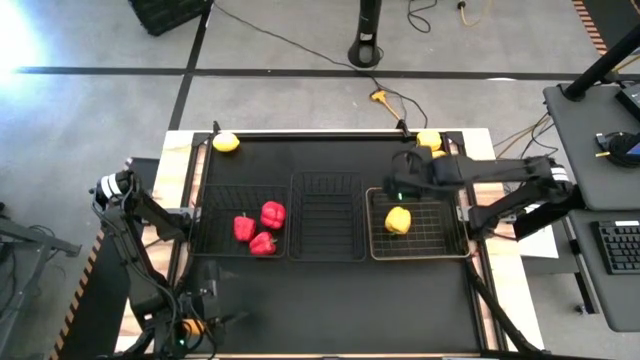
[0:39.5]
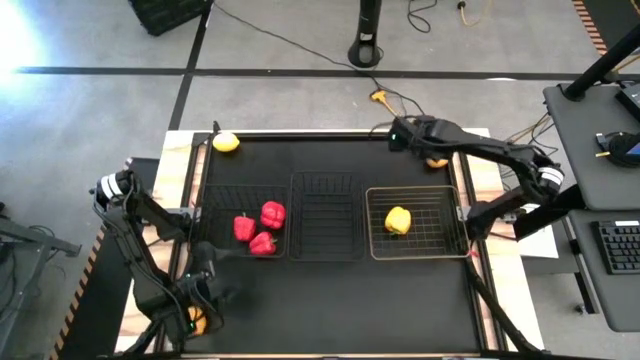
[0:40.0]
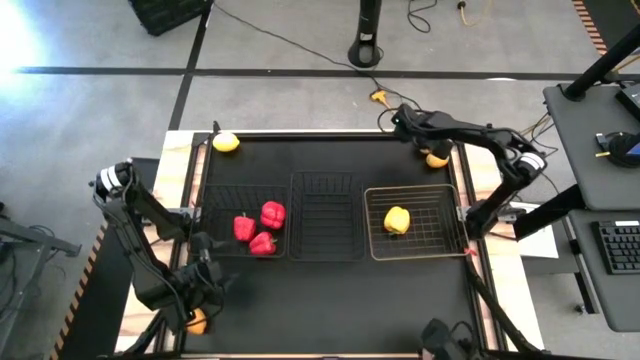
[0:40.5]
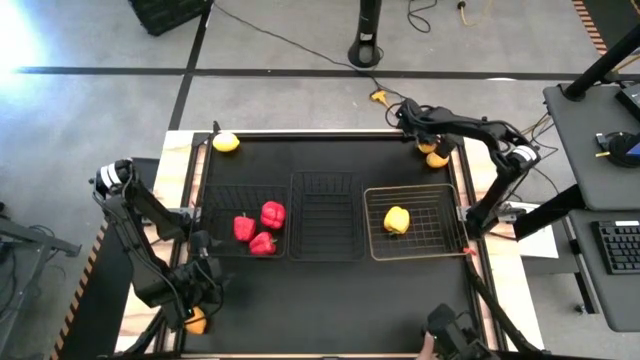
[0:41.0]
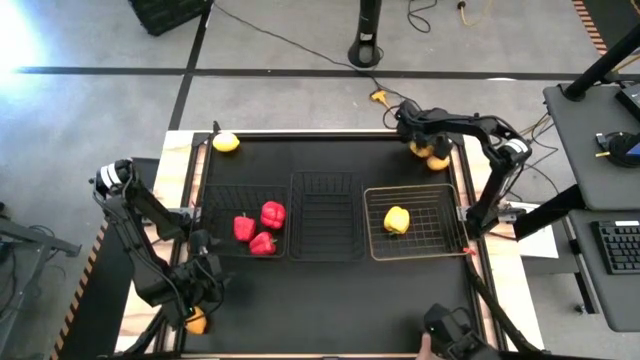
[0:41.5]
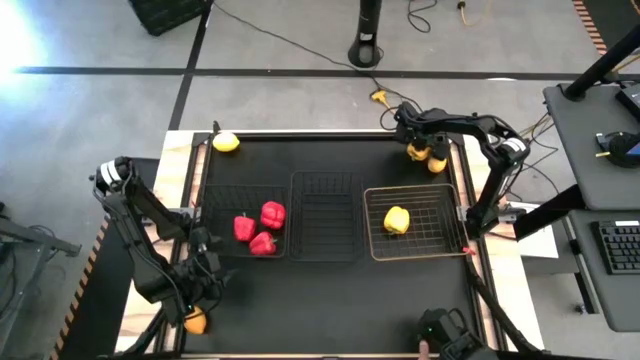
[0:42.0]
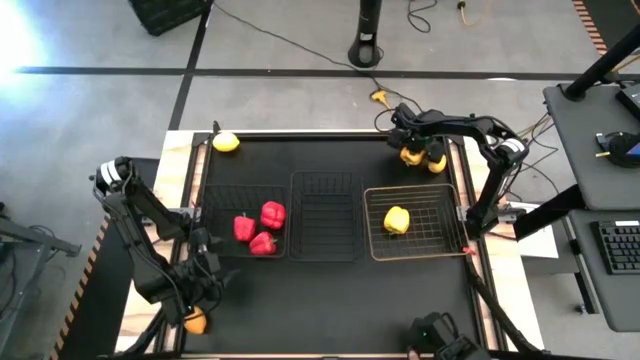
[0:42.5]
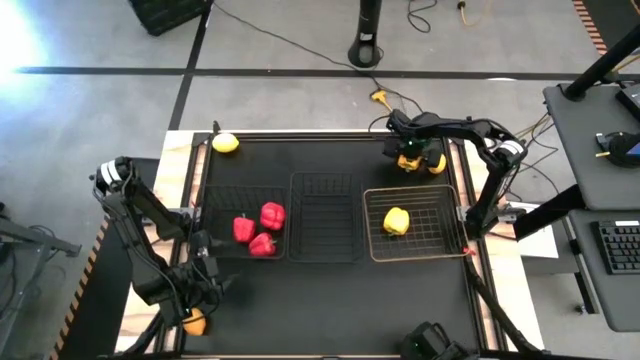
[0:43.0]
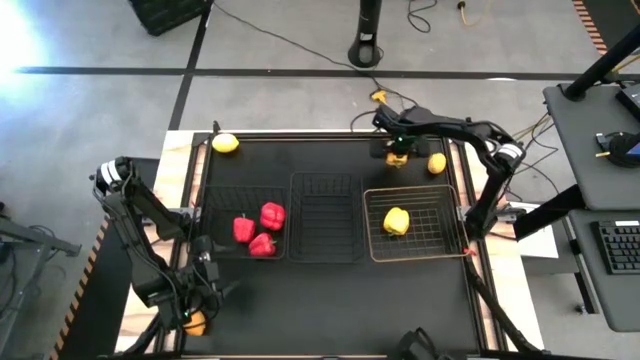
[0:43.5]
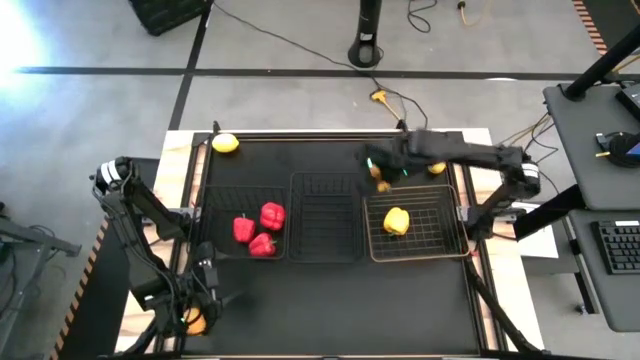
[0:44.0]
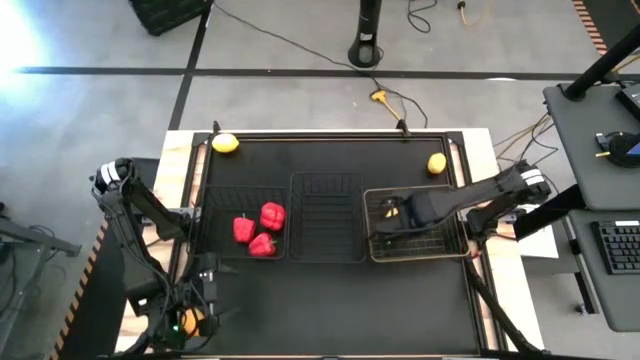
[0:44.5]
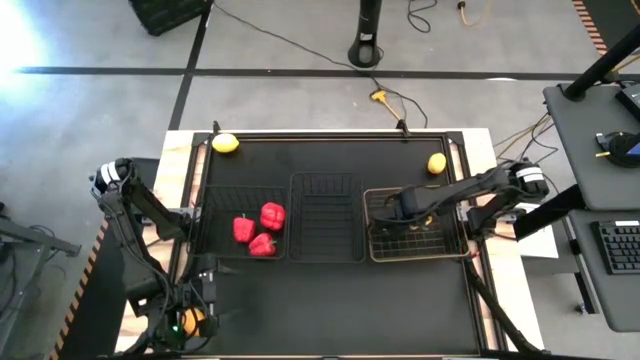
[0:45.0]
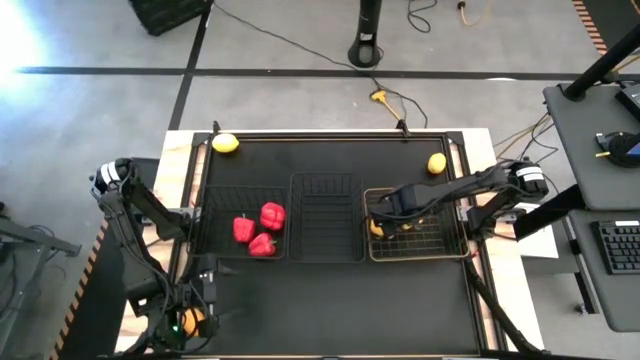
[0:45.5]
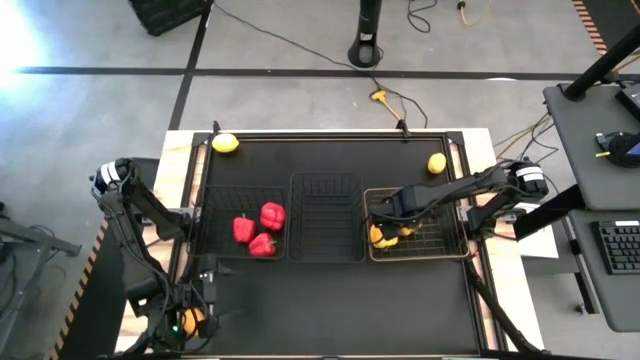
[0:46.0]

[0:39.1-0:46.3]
Task: Sort produce into baskets
Put the yellow bell pepper into the gold wire basket

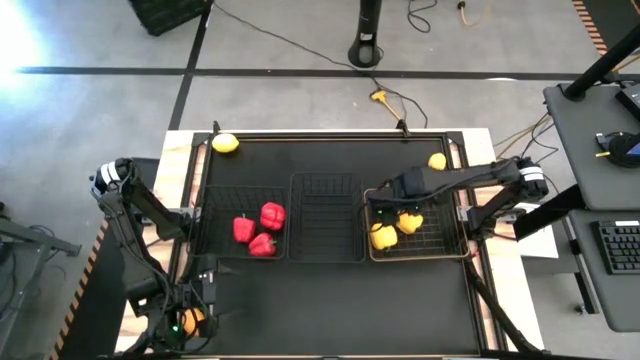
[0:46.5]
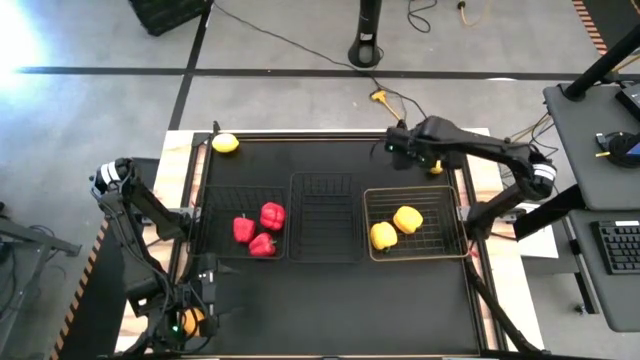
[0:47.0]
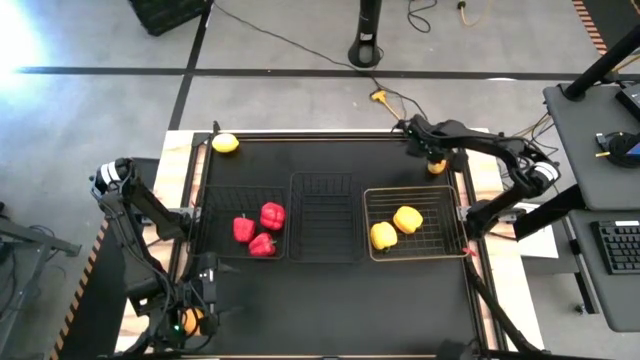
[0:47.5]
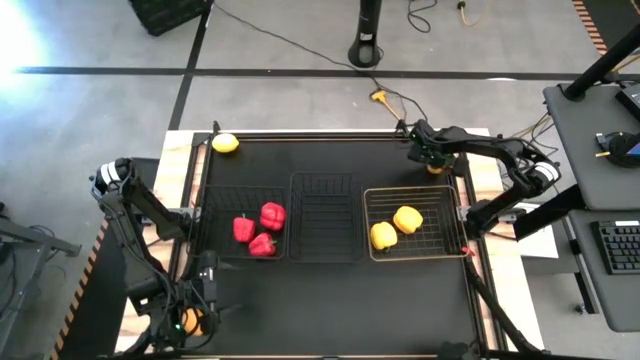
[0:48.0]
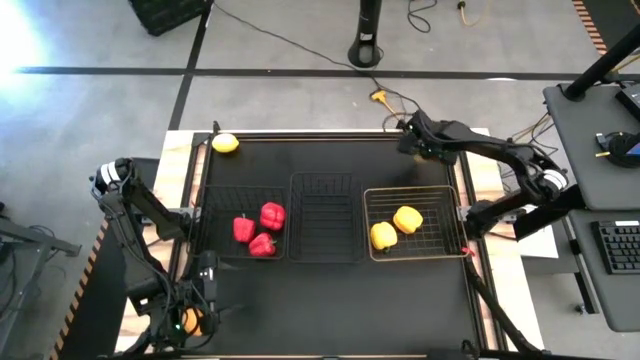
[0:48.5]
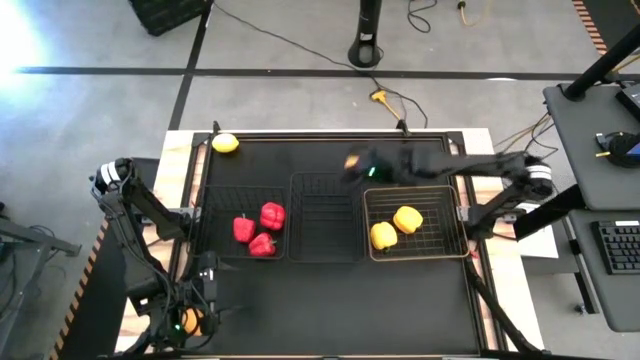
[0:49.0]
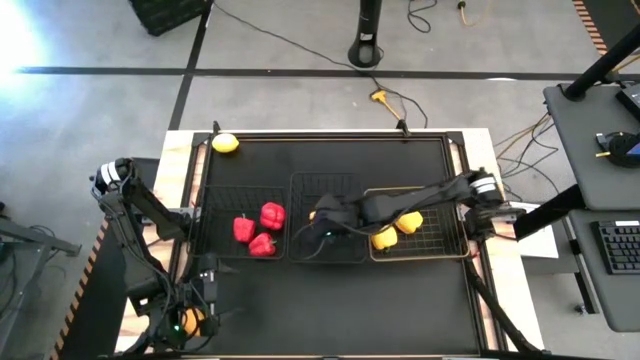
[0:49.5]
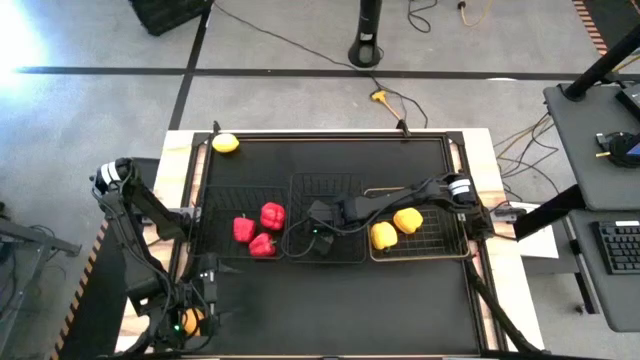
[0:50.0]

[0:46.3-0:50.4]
Put the right lemon into the right black wire basket

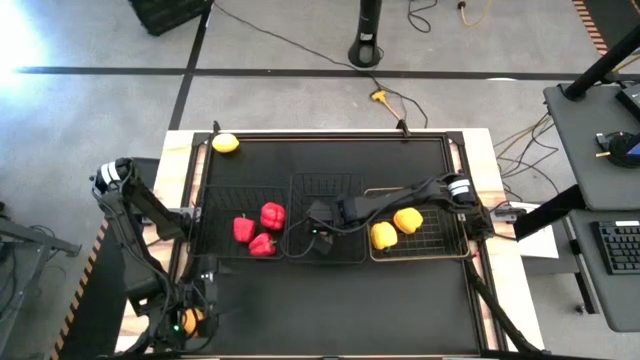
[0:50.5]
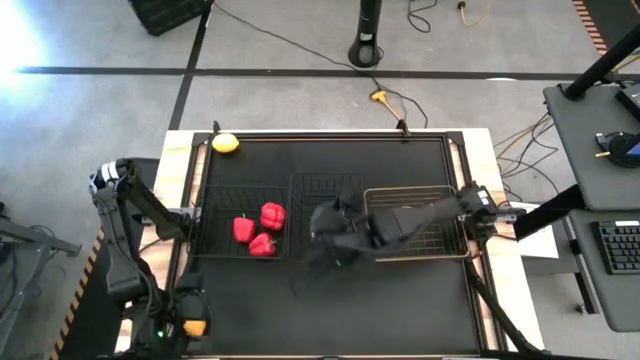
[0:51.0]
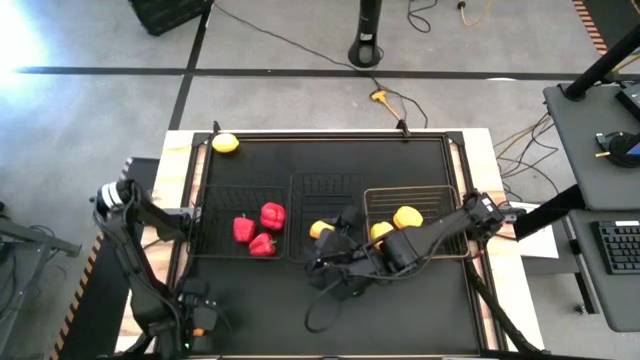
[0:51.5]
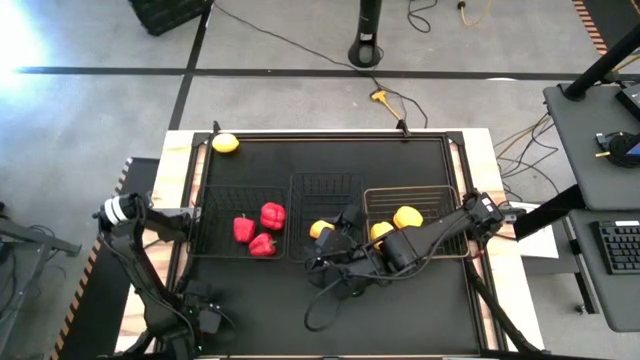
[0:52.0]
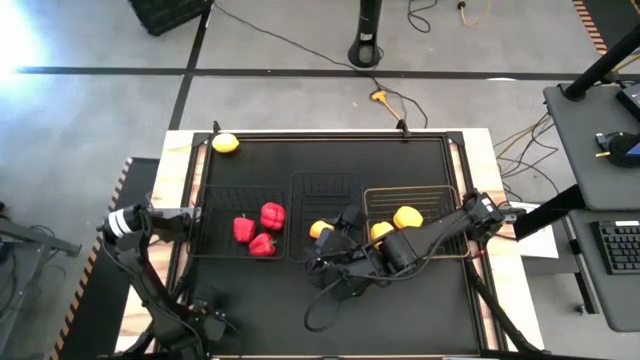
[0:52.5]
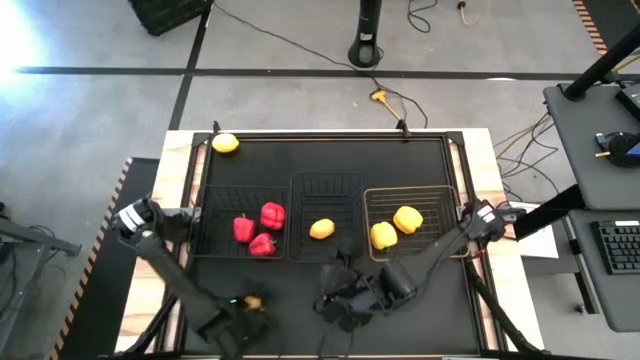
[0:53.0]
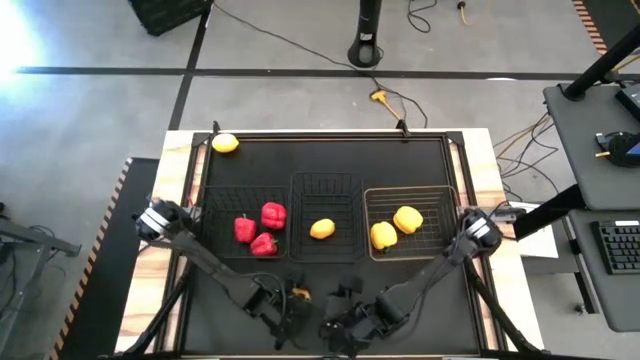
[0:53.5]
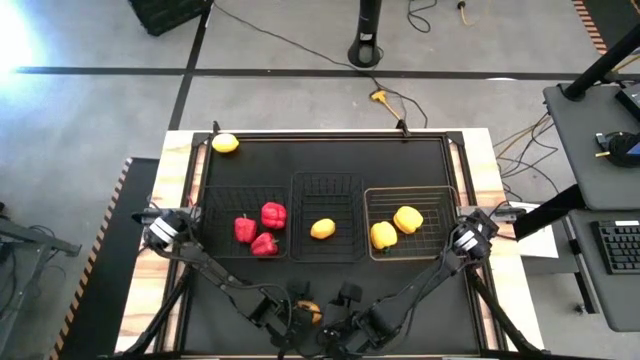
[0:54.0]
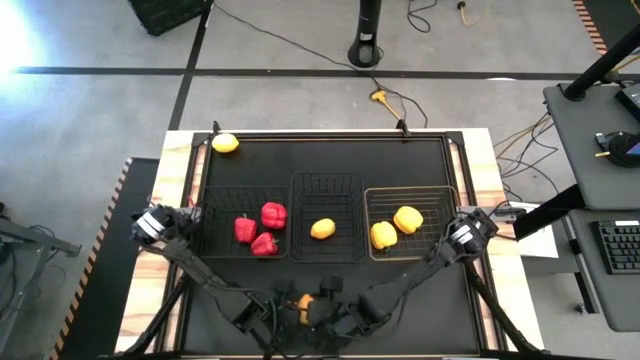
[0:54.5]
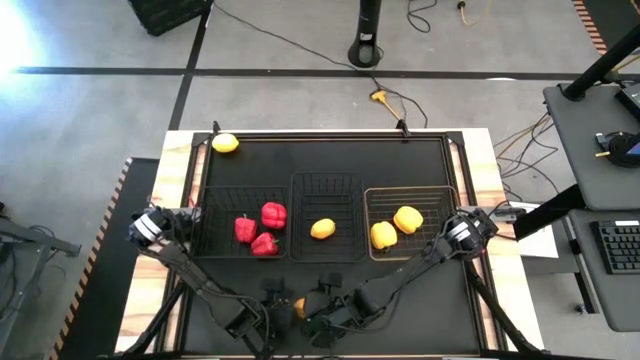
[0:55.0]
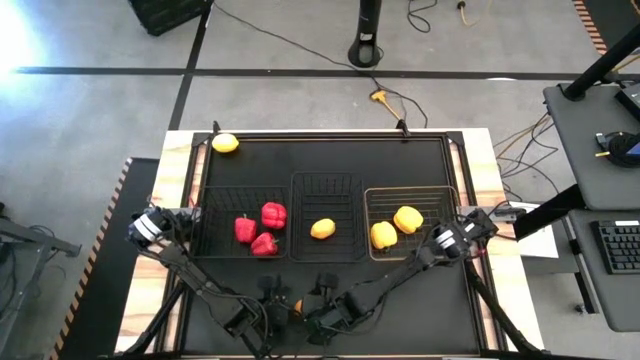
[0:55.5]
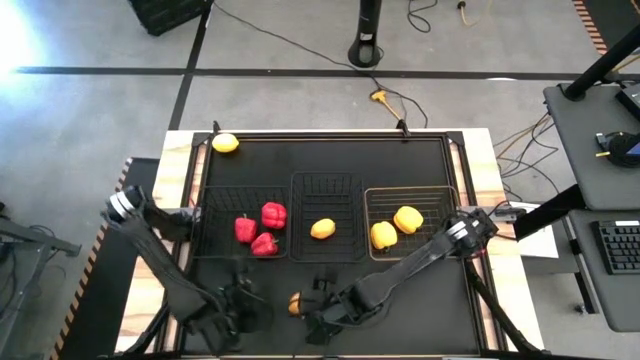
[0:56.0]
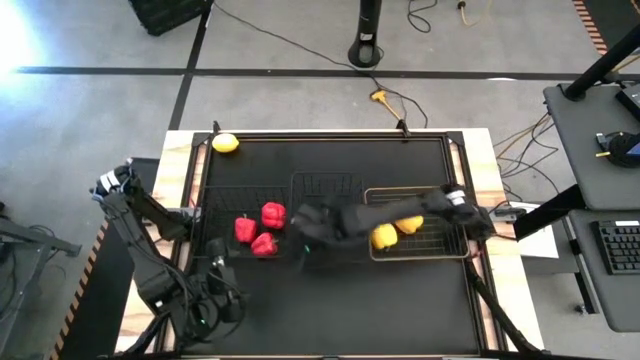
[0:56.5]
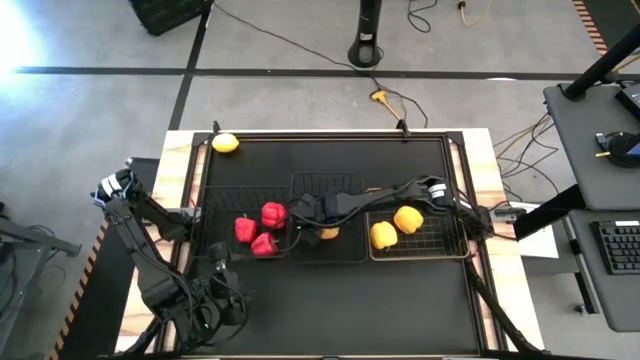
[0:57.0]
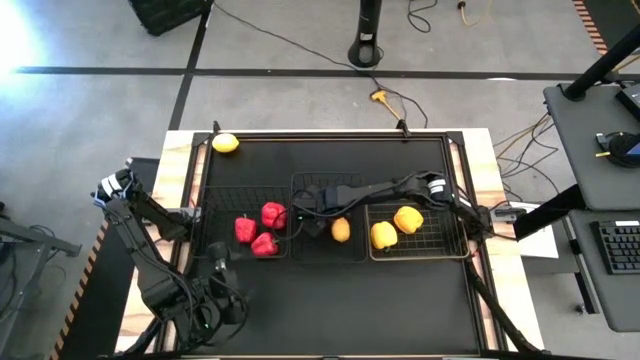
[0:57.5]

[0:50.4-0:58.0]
Put the bottom lemon into the right black wire basket

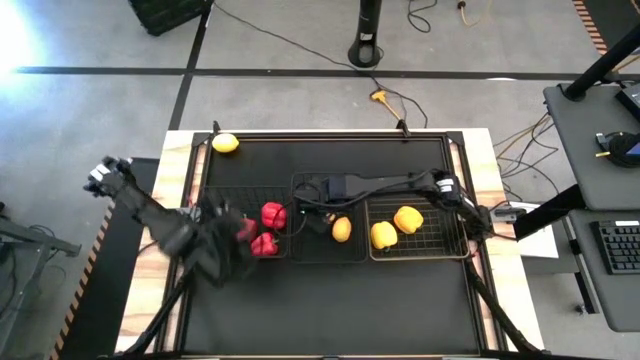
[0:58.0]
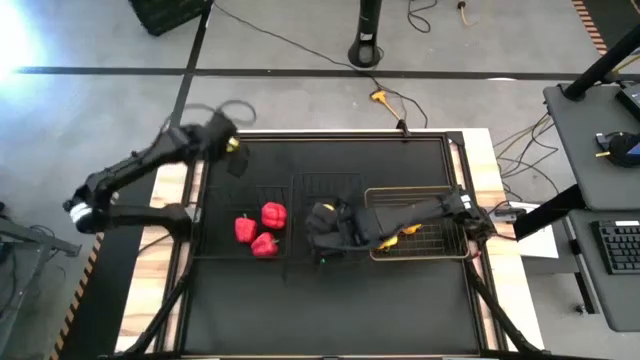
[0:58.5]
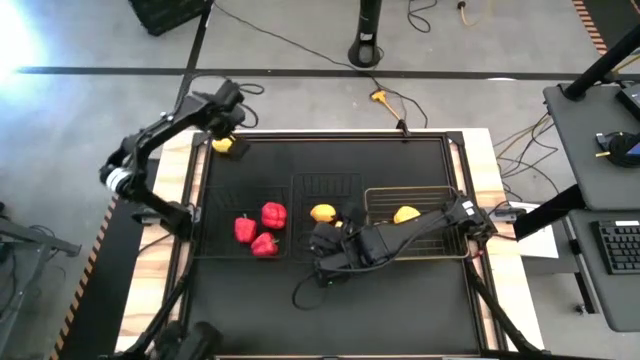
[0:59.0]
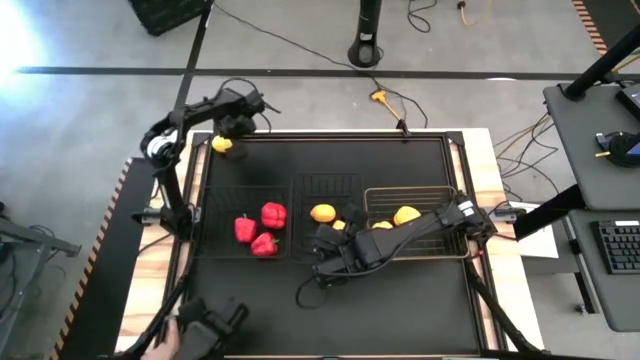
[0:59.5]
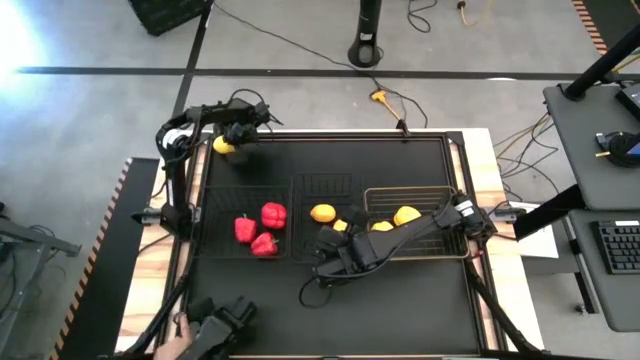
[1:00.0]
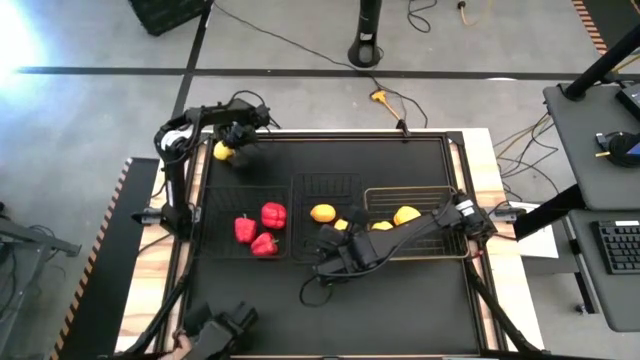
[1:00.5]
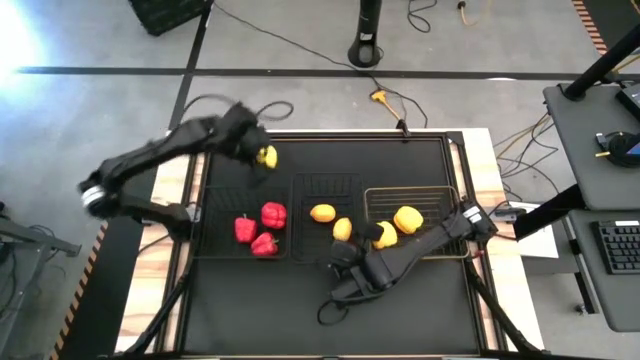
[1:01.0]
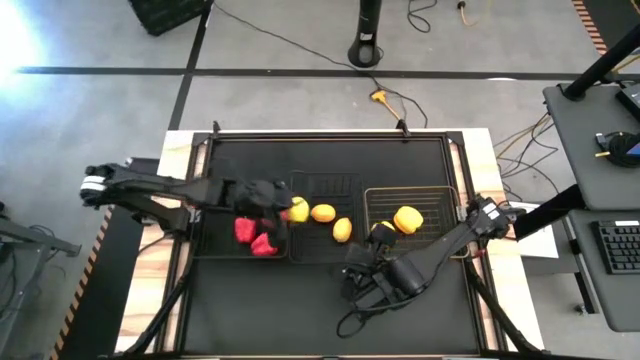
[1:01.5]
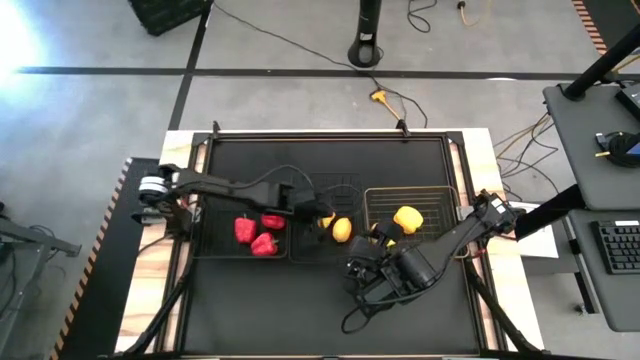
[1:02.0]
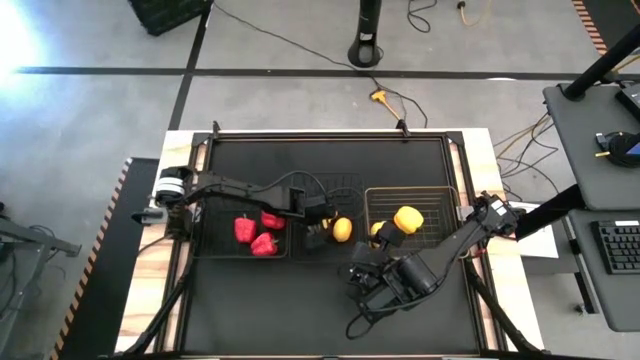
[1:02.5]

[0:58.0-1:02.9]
Put the lemon into the right black wire basket
